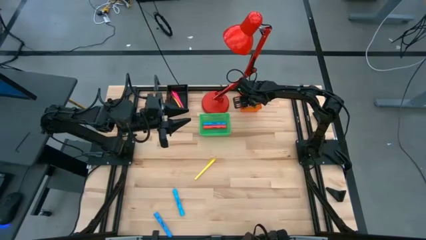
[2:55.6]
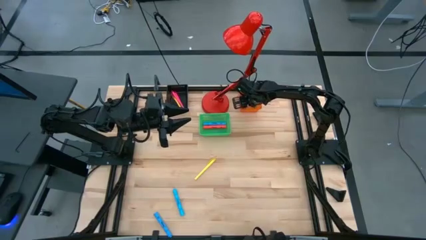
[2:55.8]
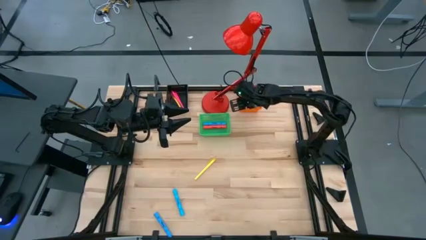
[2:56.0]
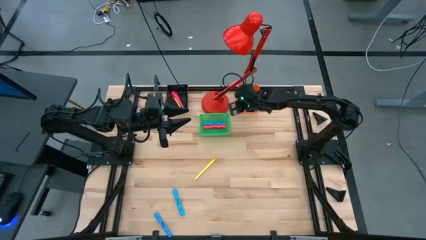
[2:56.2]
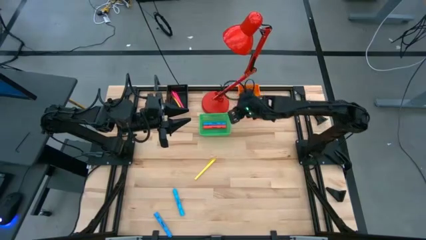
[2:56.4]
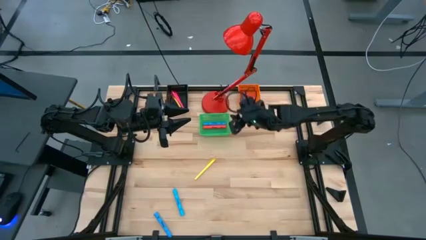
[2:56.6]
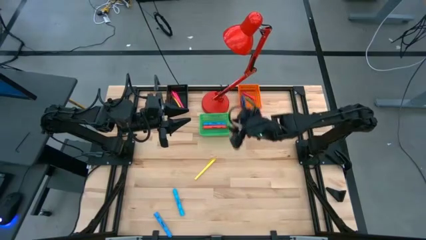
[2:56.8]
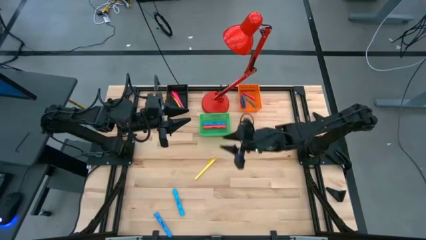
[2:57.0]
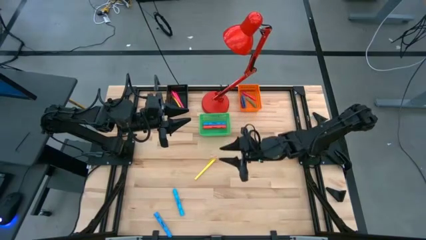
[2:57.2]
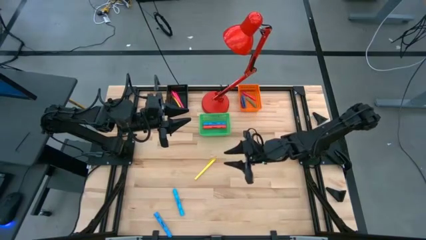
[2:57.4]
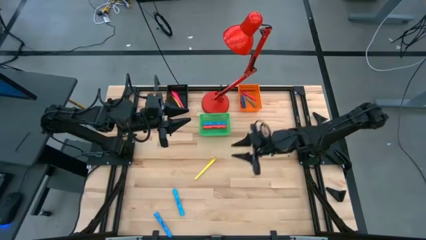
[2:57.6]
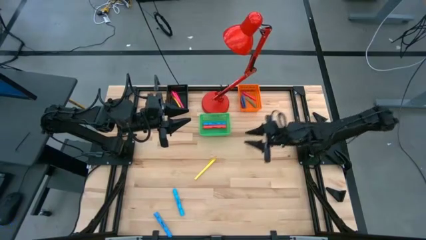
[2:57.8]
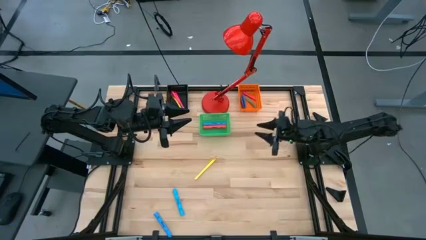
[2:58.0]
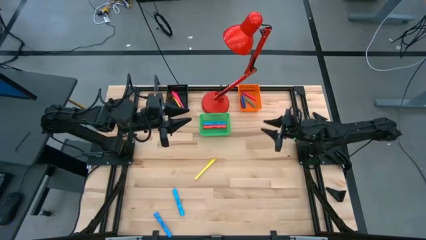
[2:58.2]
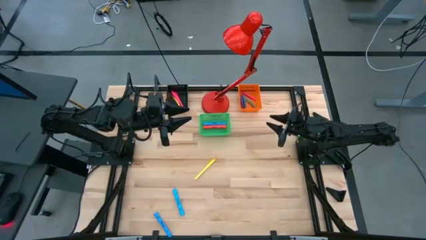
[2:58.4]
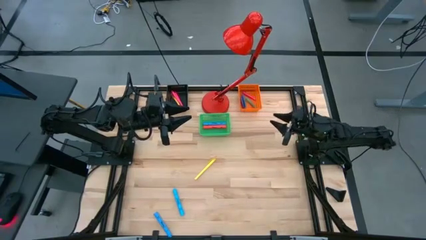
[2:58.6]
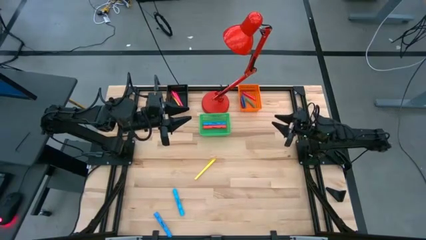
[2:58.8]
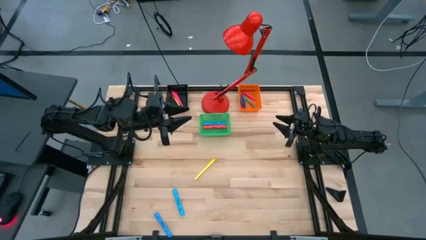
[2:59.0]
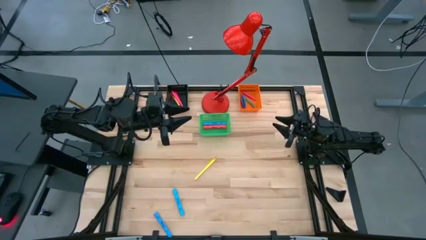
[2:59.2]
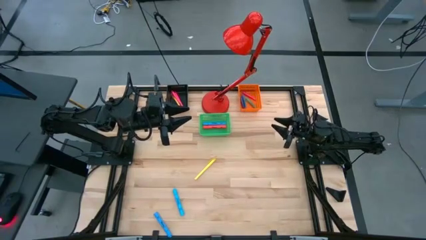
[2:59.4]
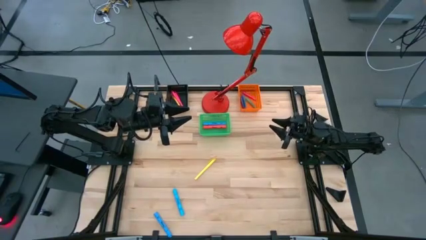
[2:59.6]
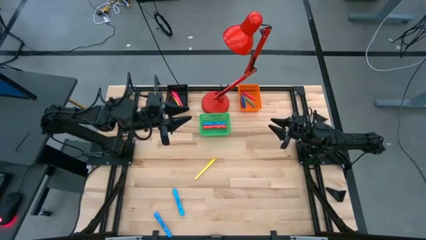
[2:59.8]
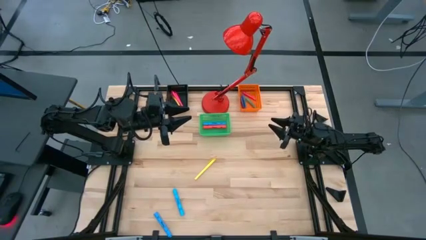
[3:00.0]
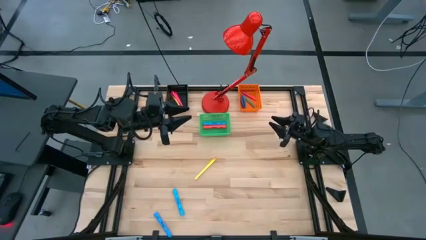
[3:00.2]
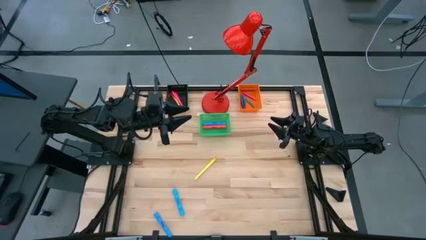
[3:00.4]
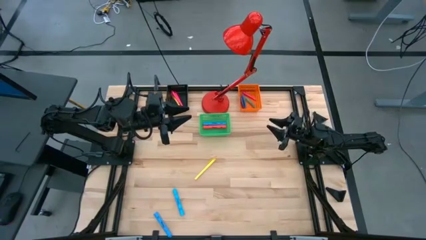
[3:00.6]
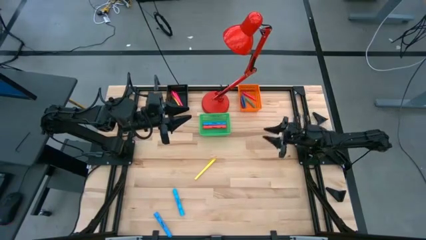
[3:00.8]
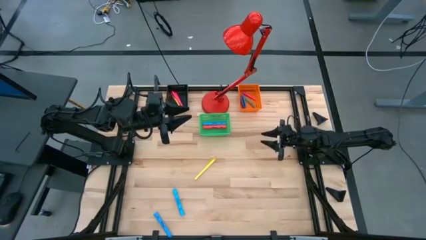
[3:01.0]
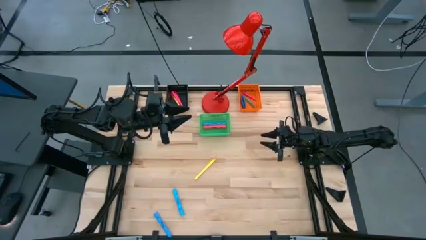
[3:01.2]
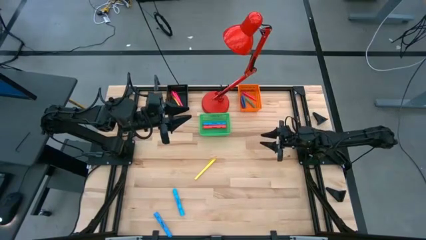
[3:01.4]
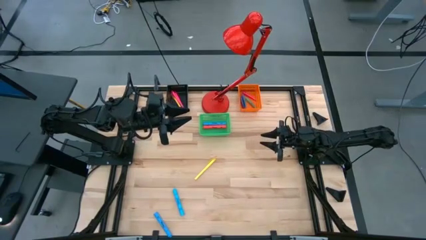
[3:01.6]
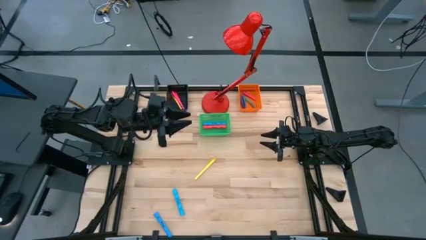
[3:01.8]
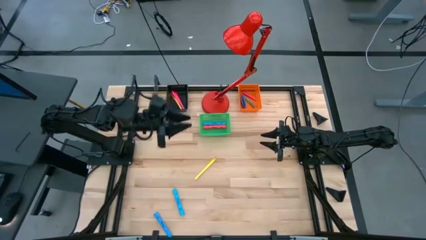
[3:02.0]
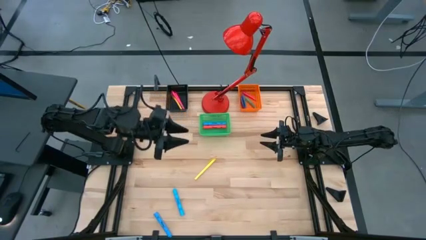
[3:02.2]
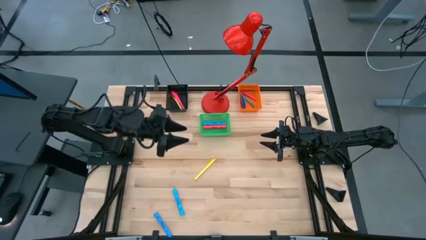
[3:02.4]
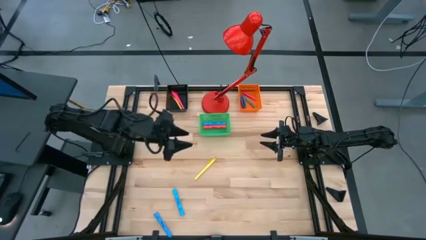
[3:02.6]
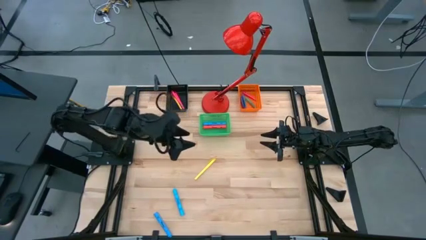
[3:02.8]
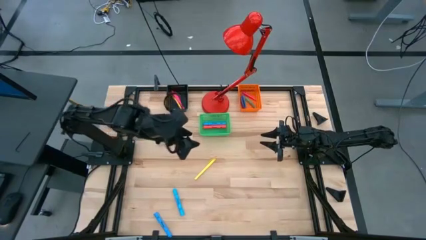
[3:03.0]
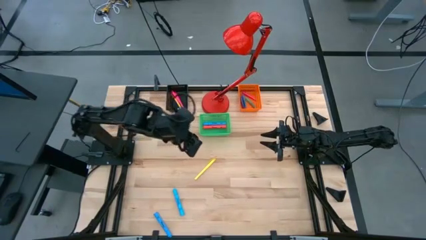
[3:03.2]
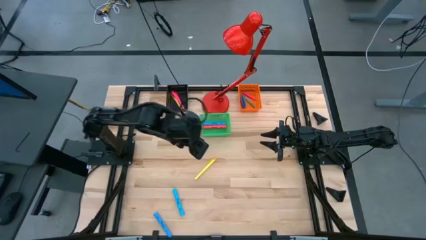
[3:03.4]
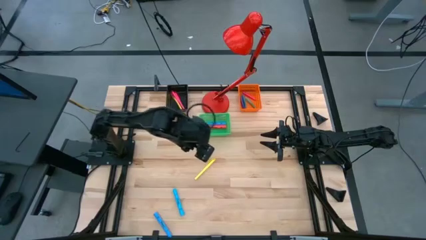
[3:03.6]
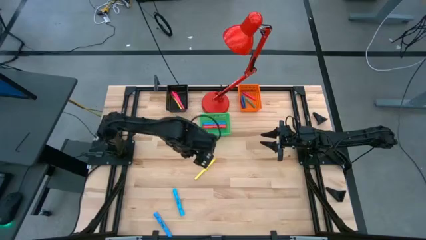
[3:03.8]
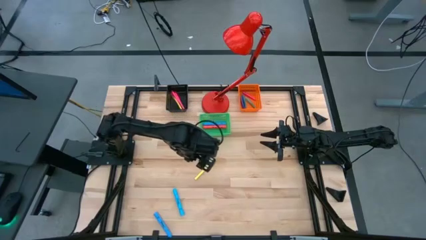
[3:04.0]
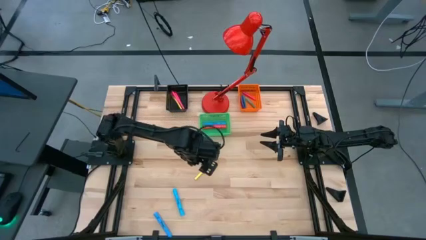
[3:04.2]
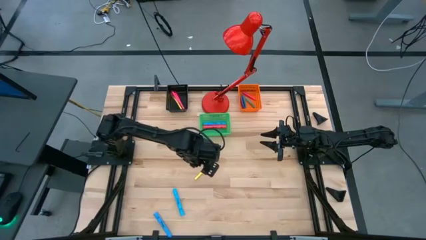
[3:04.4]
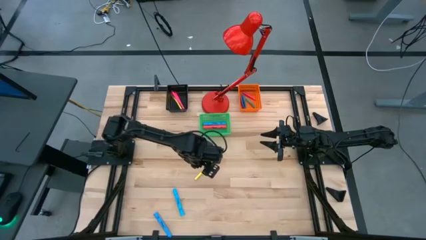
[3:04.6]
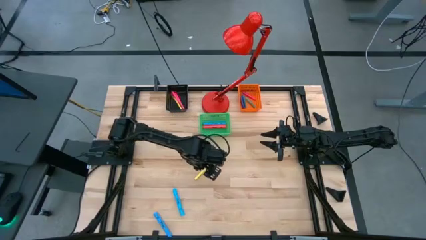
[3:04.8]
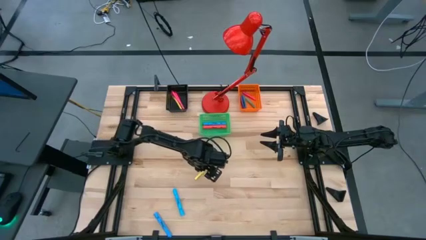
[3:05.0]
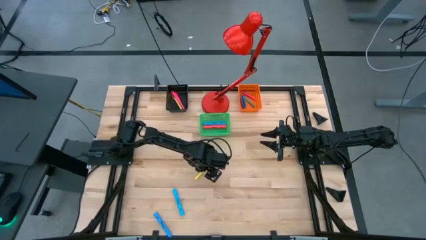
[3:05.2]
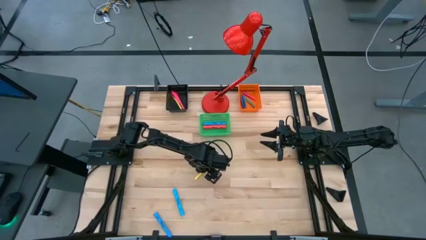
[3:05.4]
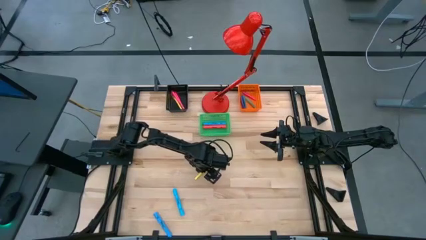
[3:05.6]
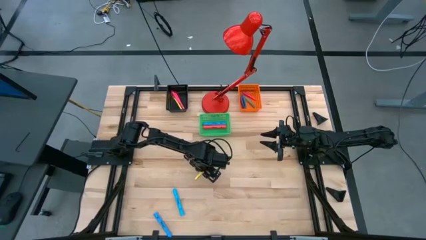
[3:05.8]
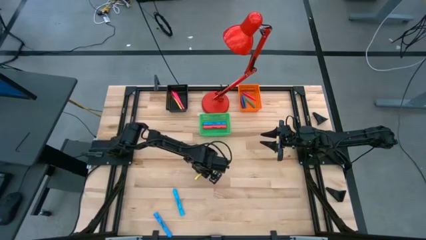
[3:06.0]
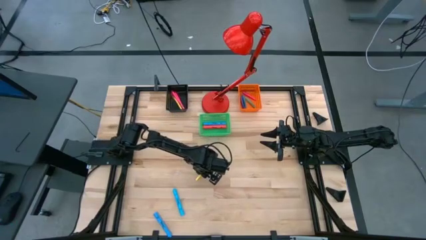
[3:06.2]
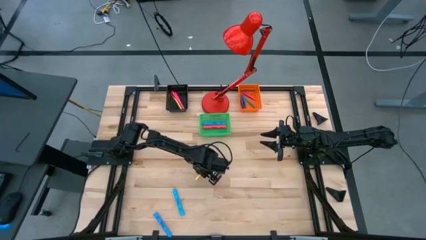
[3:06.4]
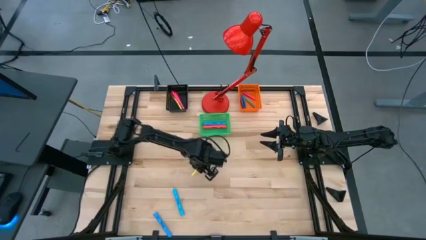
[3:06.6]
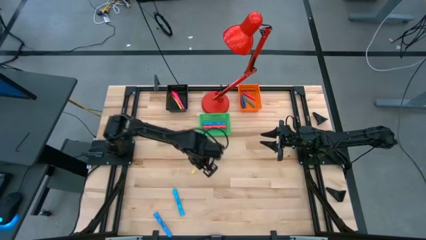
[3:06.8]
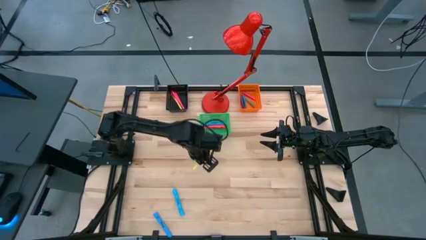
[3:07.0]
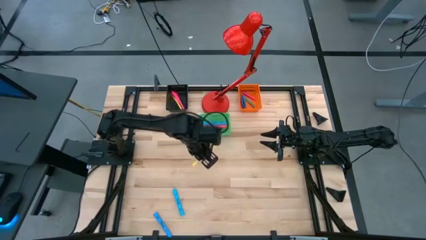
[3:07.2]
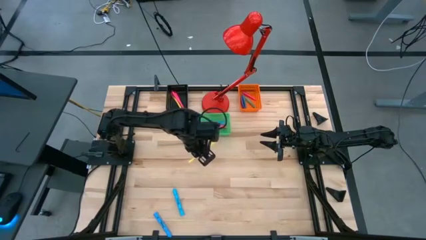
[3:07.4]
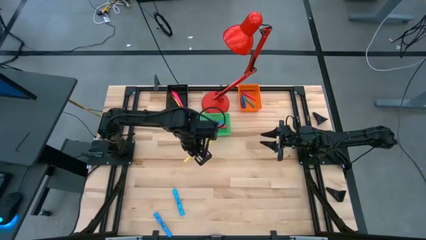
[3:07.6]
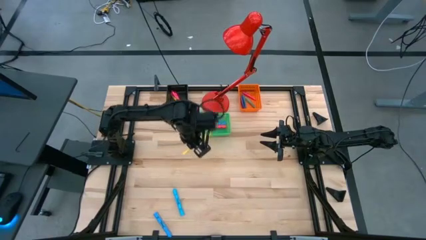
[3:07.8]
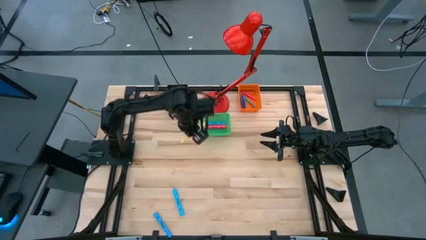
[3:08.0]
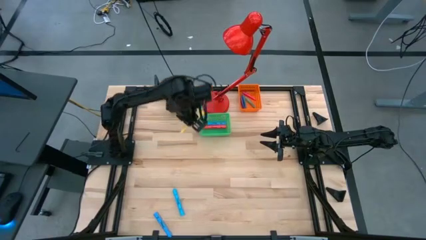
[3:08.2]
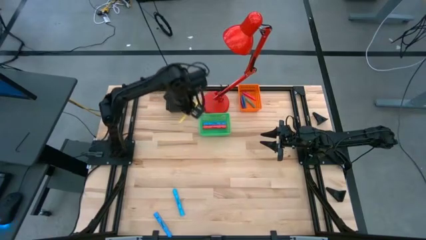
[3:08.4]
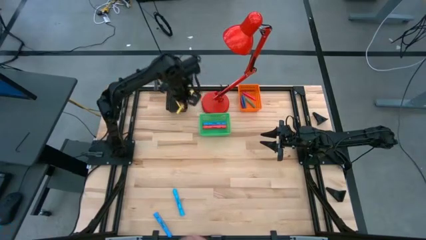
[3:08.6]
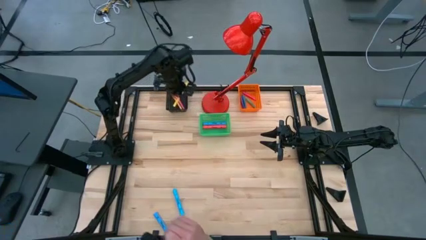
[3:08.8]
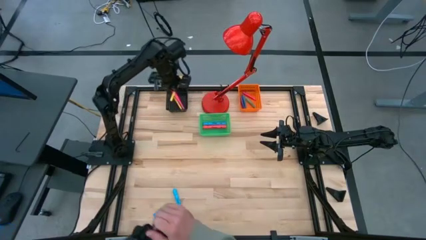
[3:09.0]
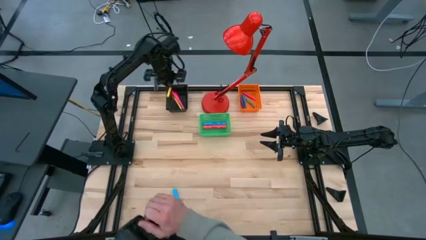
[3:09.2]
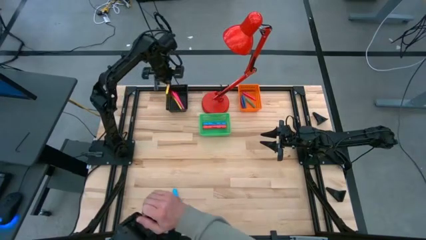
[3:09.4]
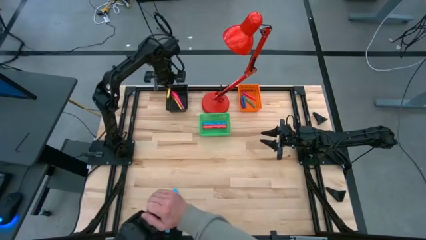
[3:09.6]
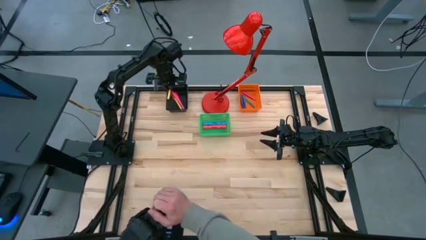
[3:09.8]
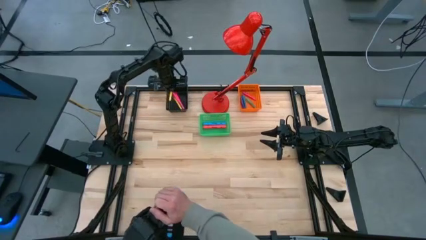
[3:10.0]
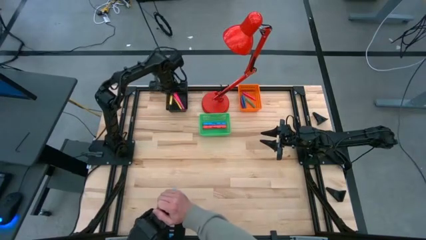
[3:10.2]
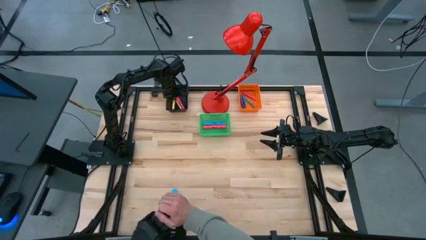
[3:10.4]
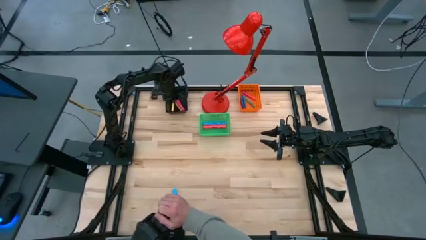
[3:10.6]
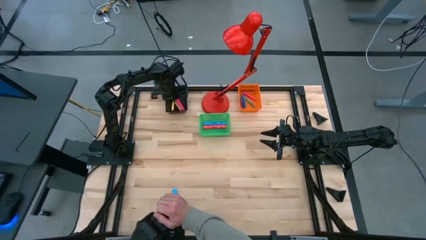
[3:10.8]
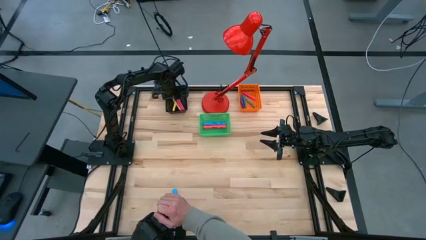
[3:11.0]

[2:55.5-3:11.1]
Task: Pick & Place Markers
Put the yellow pen into the black basket

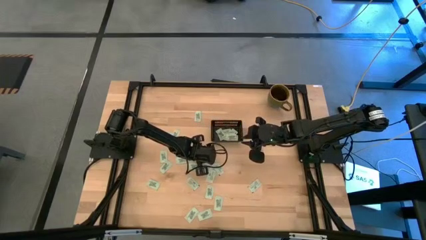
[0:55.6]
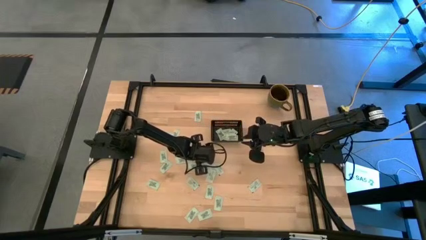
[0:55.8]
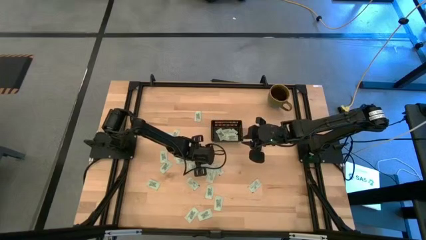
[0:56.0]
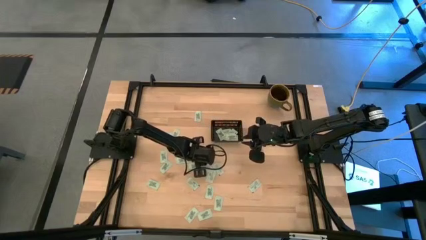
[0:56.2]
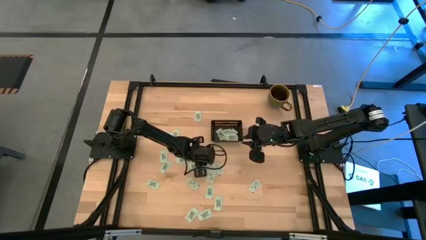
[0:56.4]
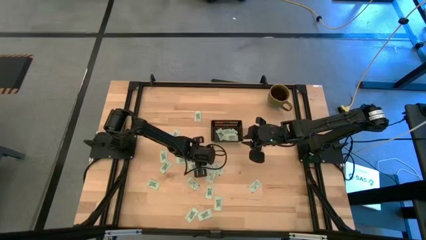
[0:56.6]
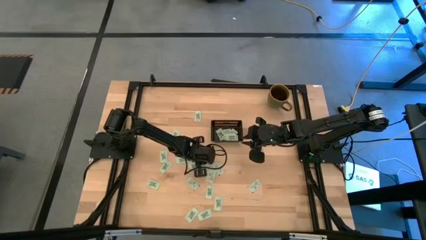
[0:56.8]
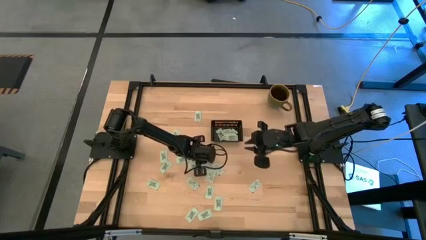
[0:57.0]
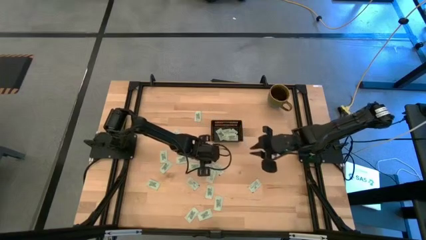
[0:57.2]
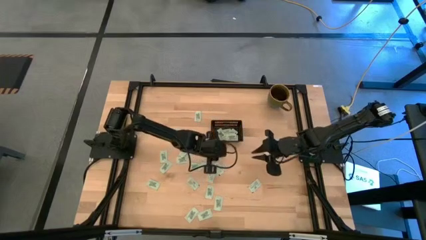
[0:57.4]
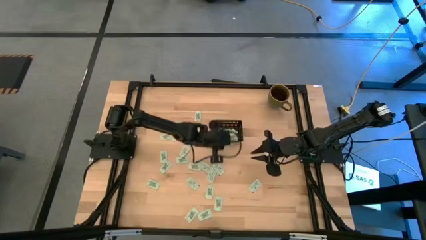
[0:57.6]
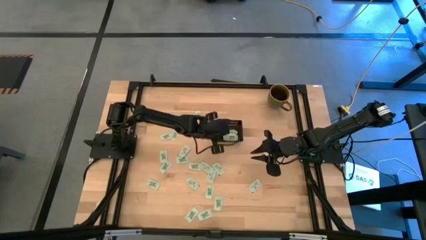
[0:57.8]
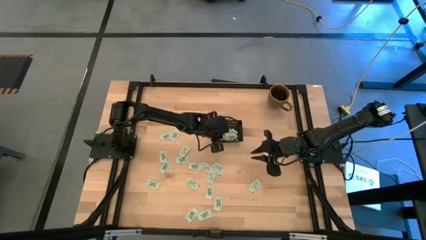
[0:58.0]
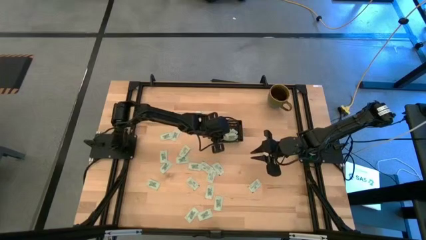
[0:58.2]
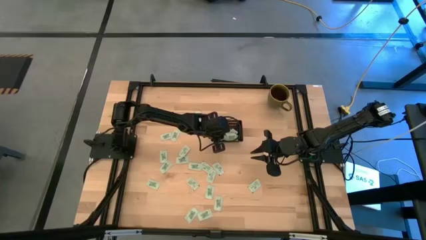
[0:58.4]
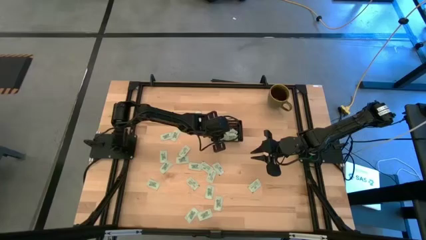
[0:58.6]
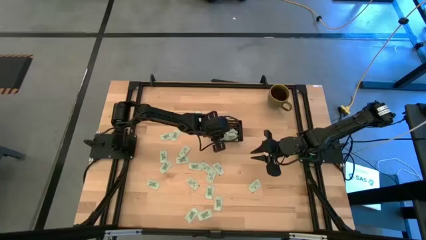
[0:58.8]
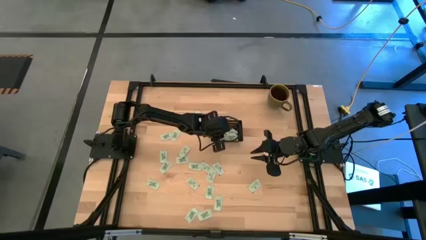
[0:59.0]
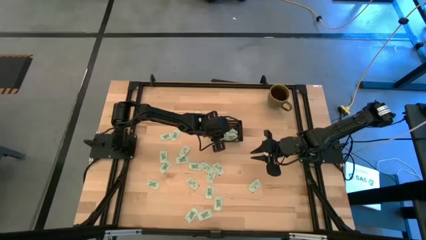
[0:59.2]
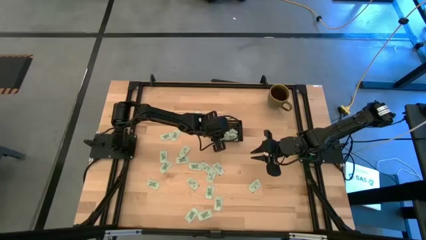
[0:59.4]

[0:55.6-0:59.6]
Task: Pick and place Stevia / Truvia into bins
Put the stevia packet into the black basket
